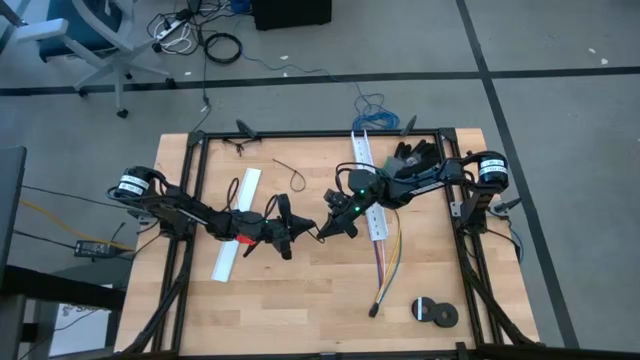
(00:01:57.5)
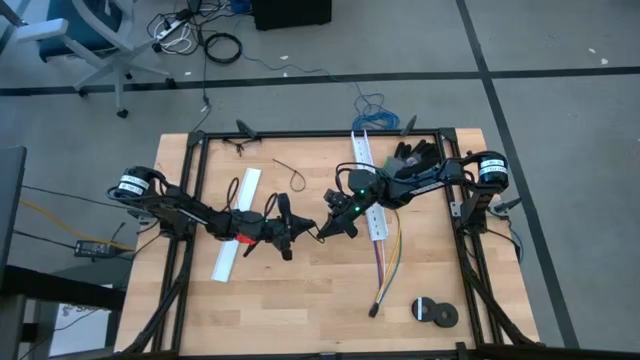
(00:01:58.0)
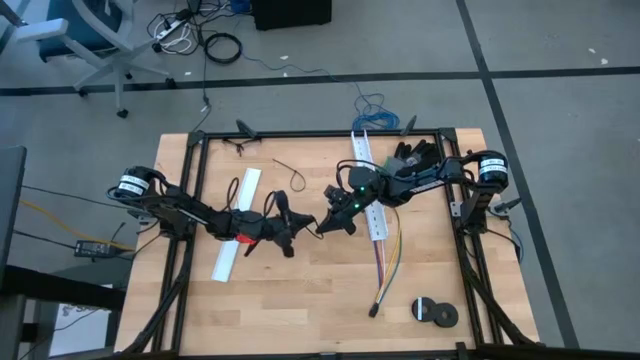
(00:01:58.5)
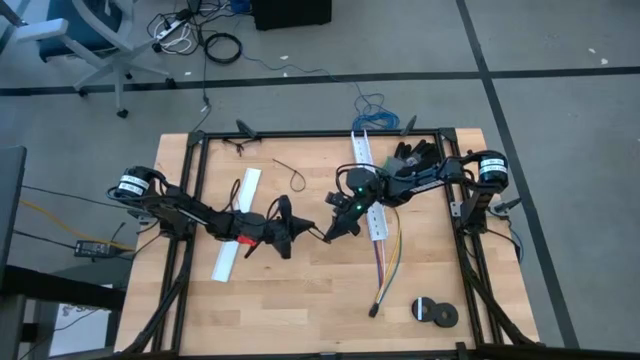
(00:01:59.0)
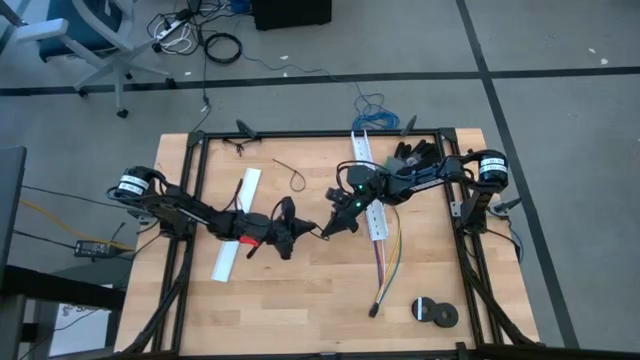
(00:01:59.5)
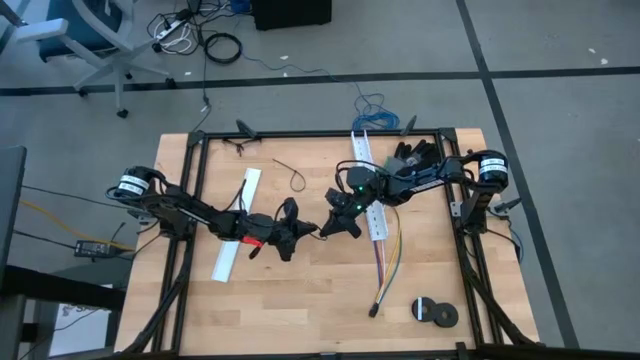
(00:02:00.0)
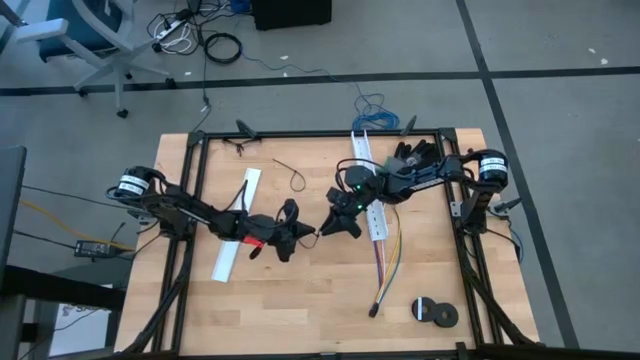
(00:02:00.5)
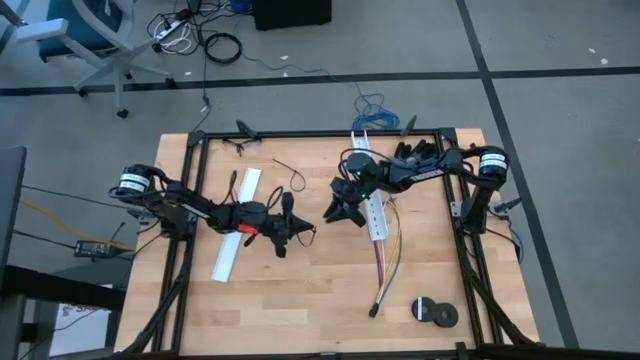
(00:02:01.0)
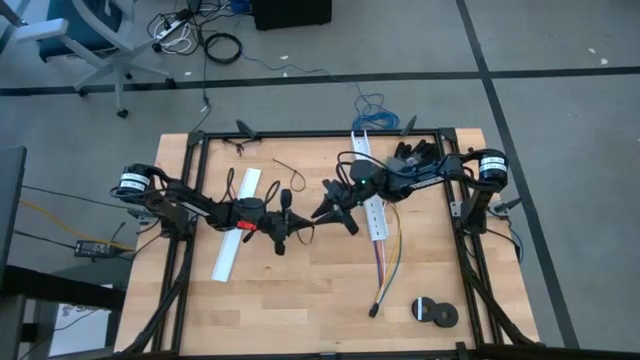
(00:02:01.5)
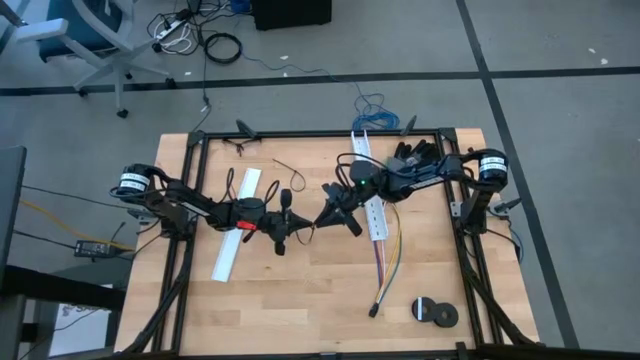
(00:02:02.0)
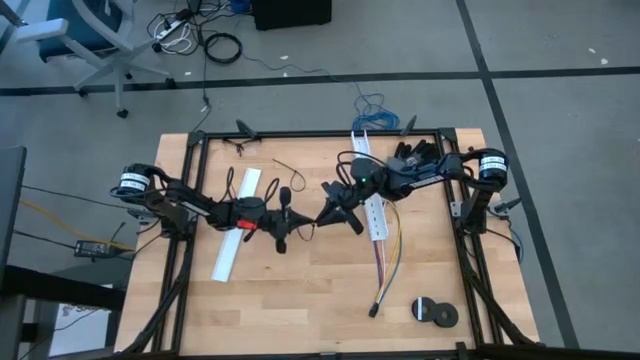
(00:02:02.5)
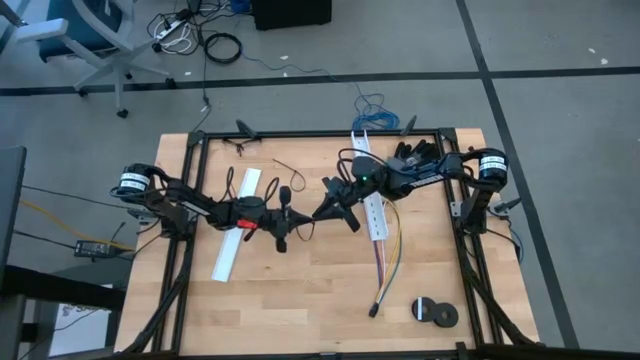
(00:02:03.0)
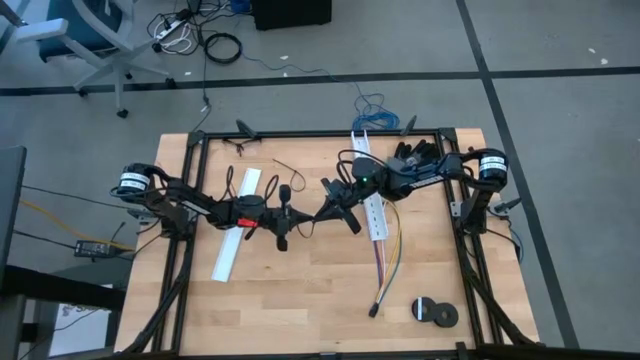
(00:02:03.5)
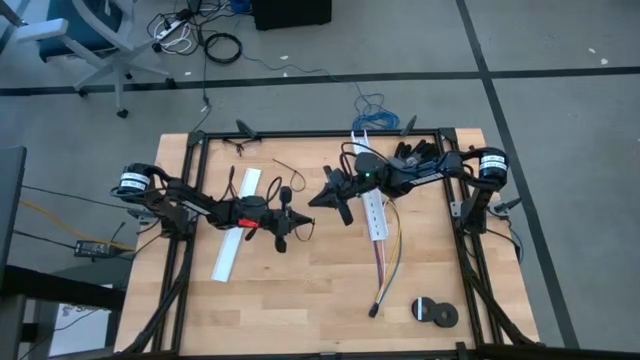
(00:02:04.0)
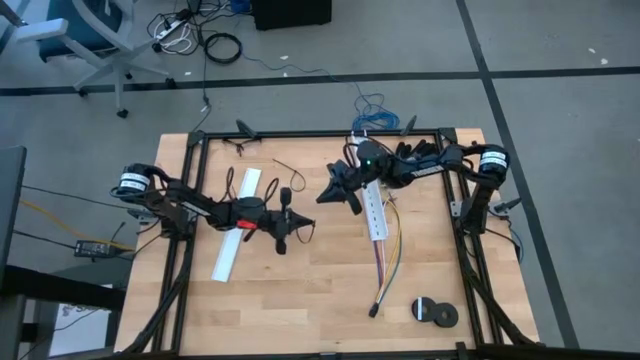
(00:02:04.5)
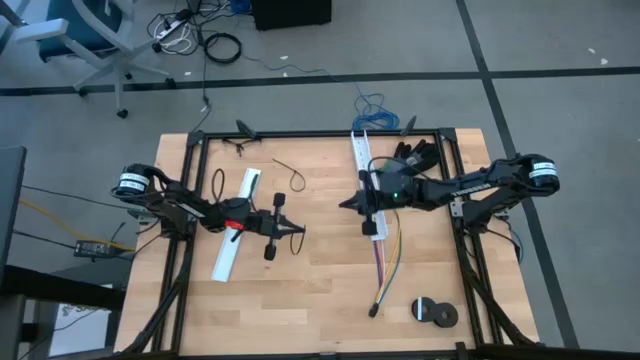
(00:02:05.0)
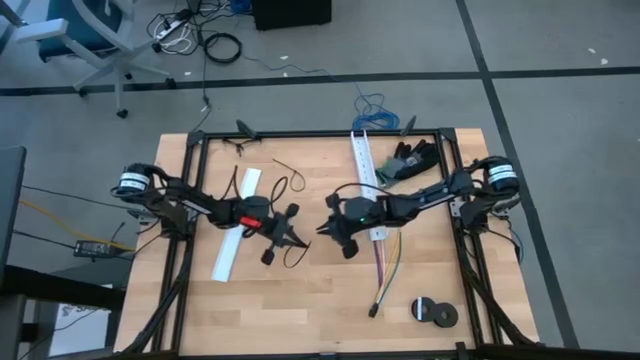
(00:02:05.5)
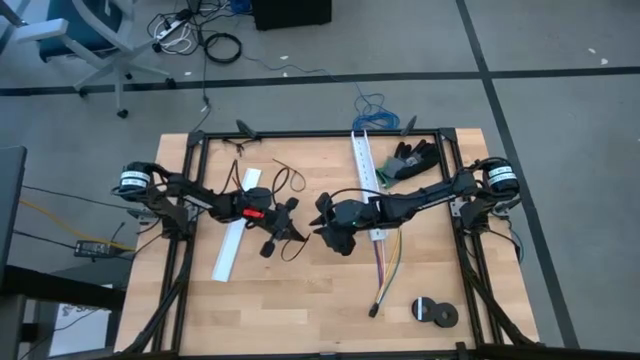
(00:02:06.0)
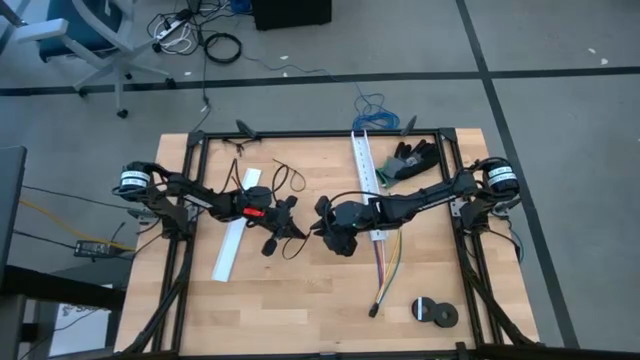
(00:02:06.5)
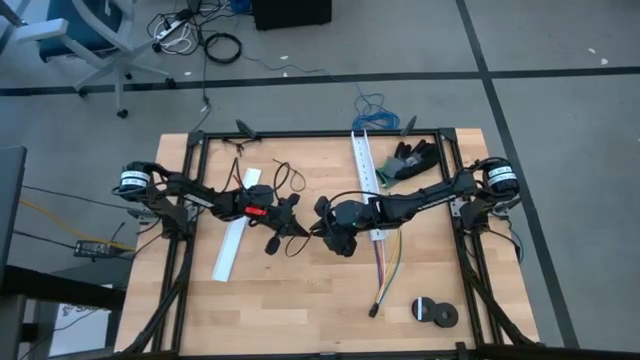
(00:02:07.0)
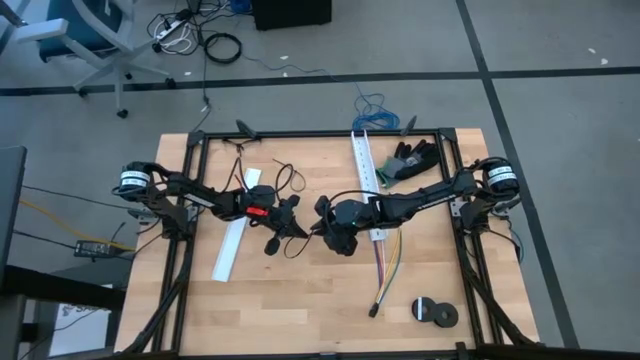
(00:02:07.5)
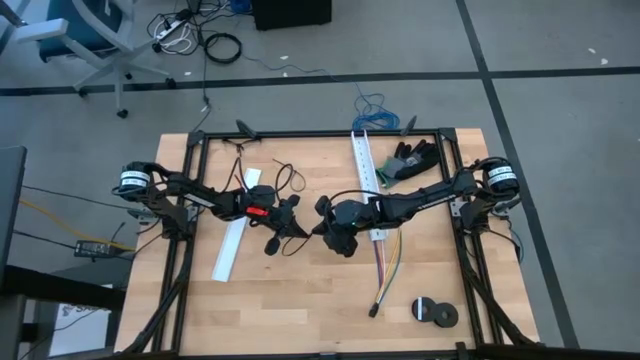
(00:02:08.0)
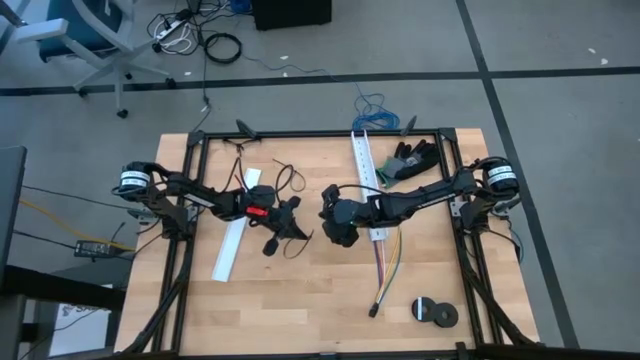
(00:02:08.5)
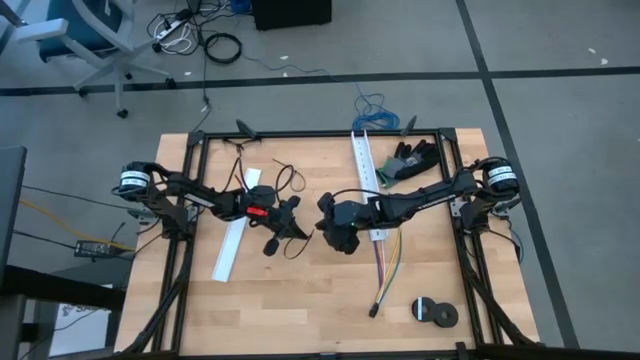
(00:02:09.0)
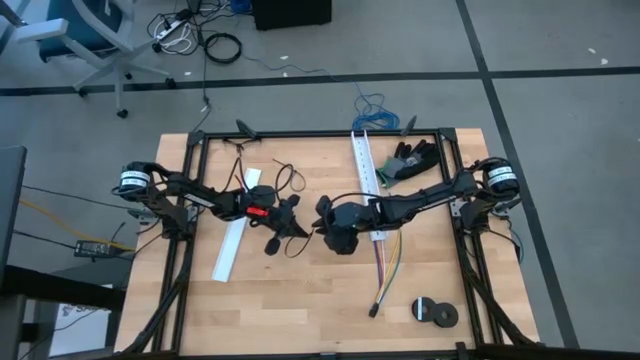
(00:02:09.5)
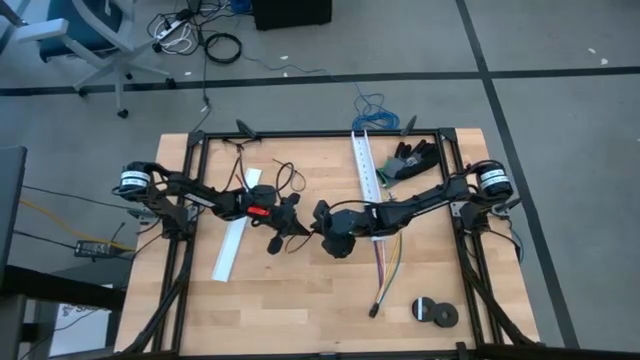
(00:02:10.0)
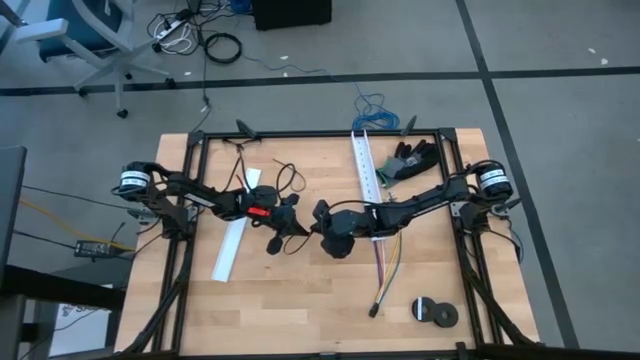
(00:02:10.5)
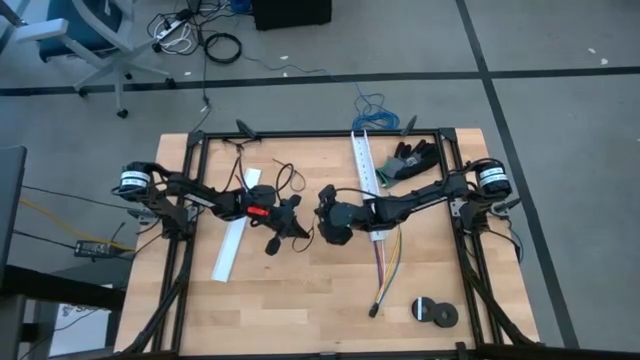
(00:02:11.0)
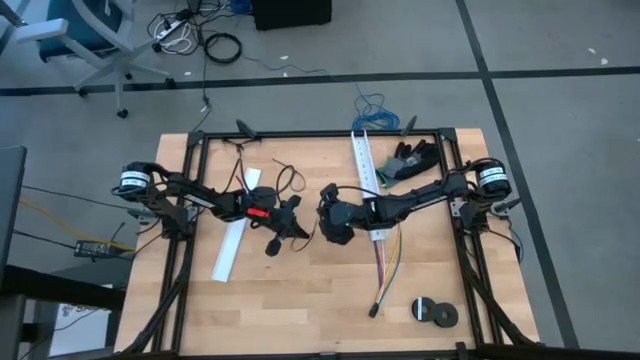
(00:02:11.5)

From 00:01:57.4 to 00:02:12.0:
Task: Ziptie cables
Prepare the black zip tie

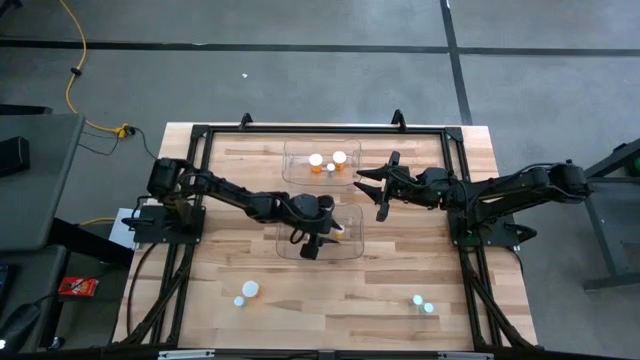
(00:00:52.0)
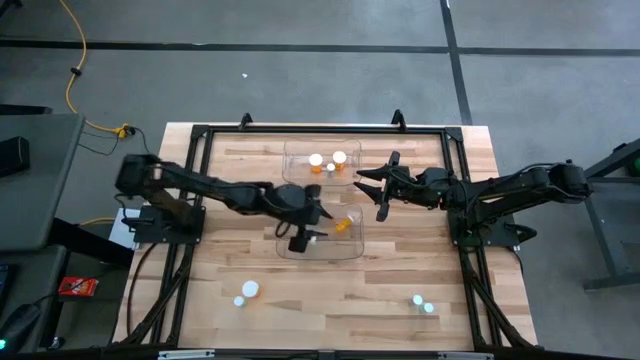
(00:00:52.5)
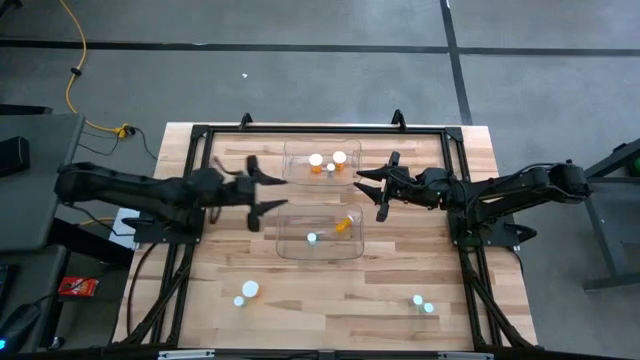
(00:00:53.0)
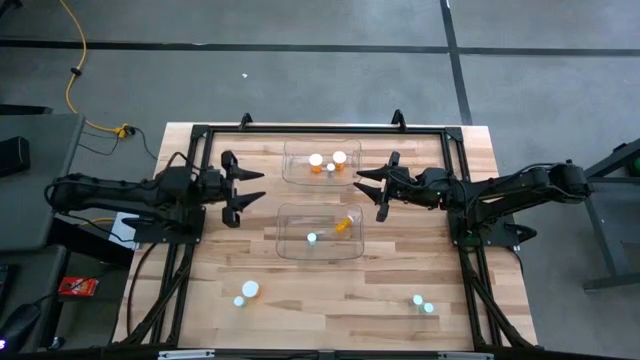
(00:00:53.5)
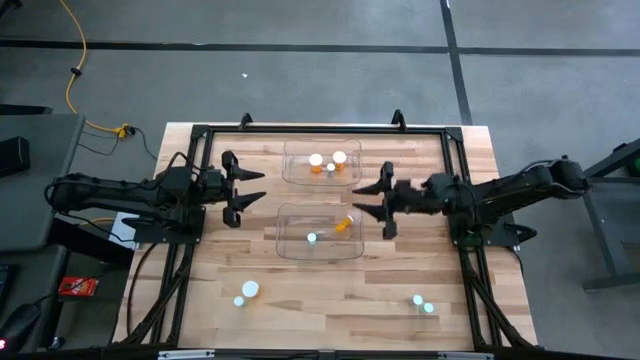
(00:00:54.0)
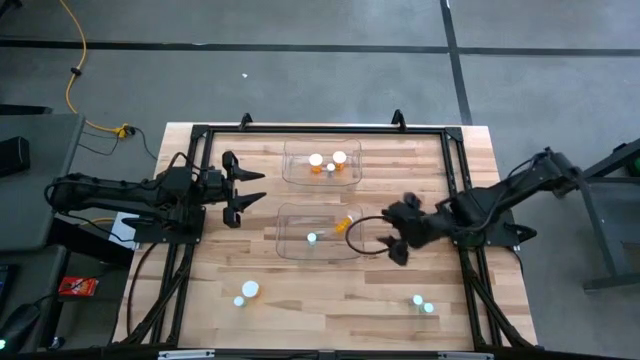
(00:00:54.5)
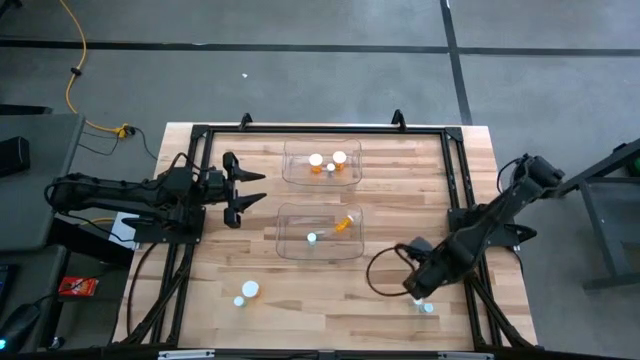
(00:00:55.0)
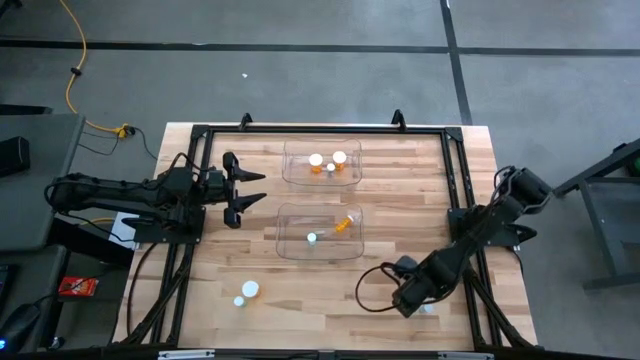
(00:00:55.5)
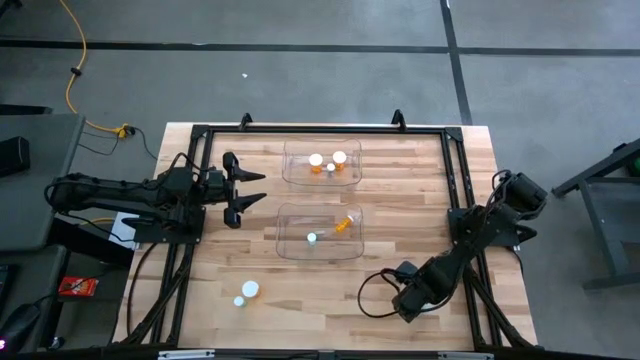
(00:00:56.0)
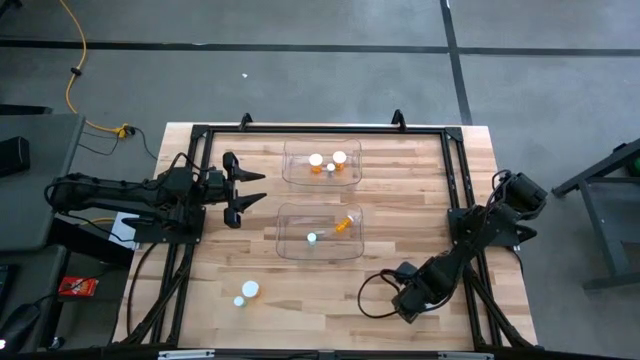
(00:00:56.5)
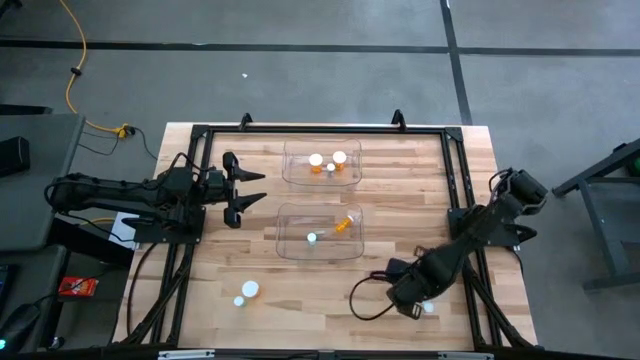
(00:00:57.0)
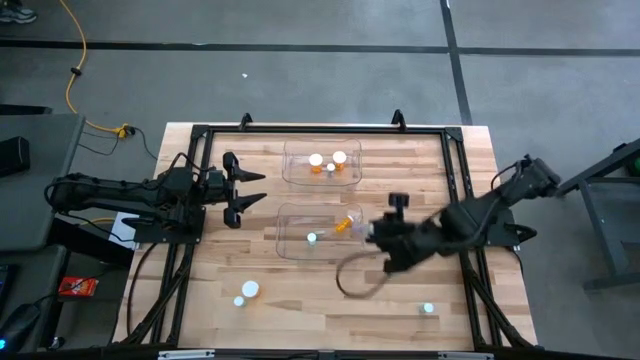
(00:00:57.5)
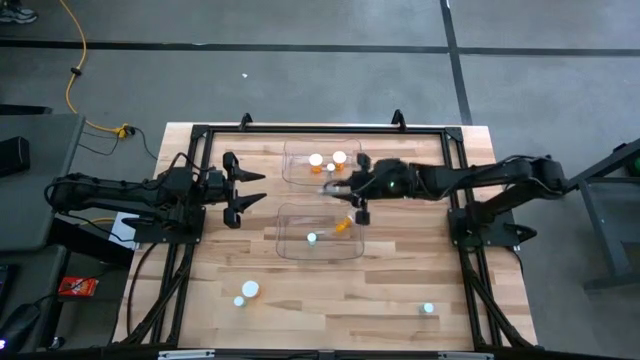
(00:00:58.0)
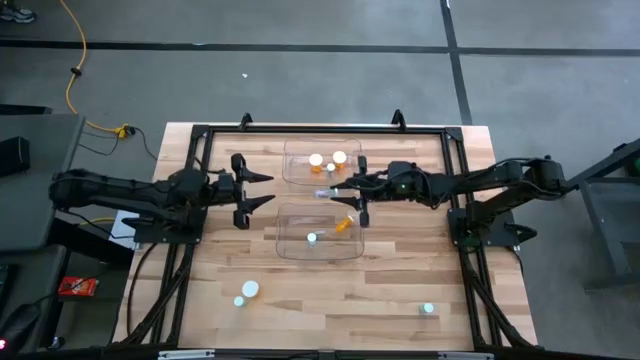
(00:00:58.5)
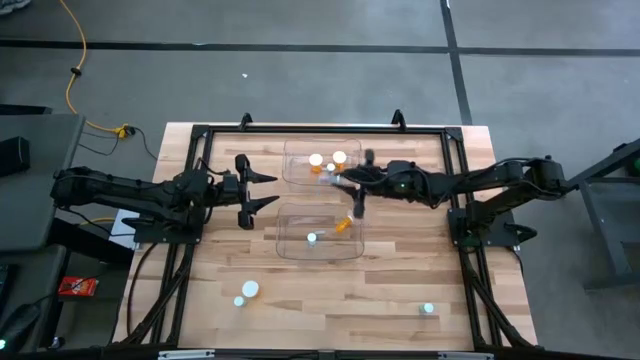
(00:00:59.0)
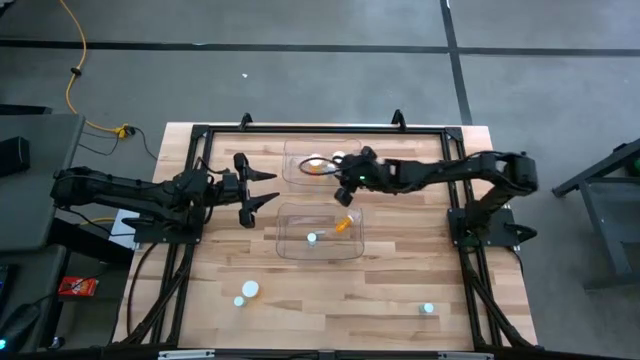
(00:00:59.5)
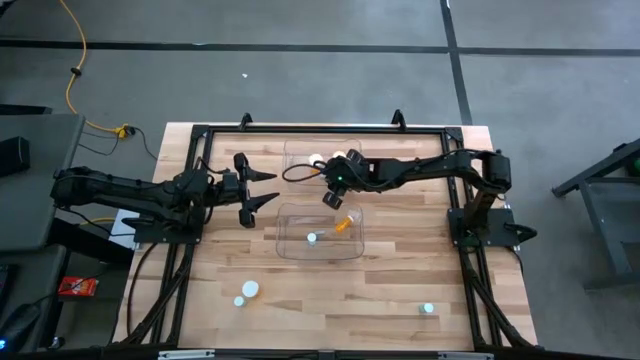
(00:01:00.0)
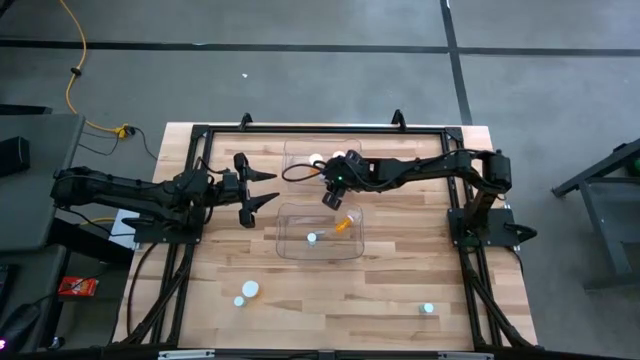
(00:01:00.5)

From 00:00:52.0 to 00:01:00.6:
Task: Pick and place medicine bottles into bin by pill shape (circle, oval)
Put the blue capsule bottle into the top transparent bin
